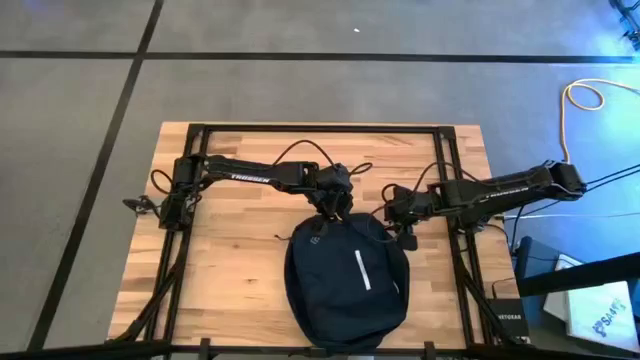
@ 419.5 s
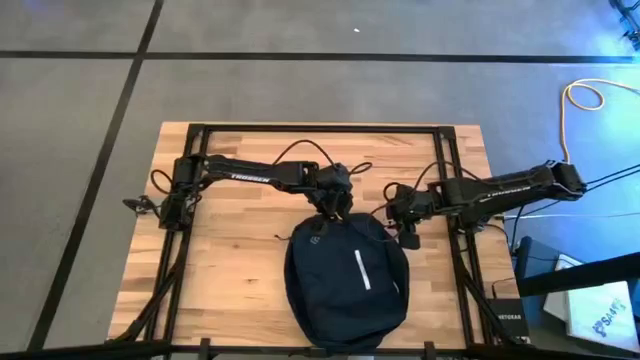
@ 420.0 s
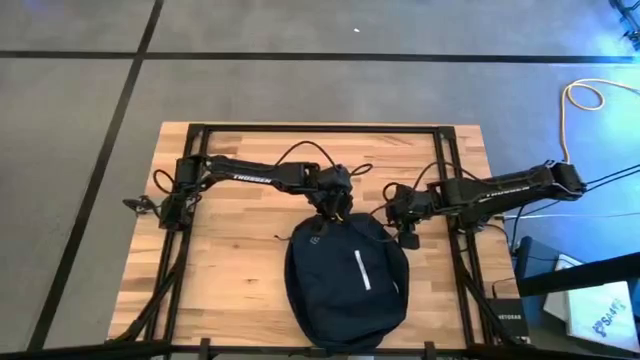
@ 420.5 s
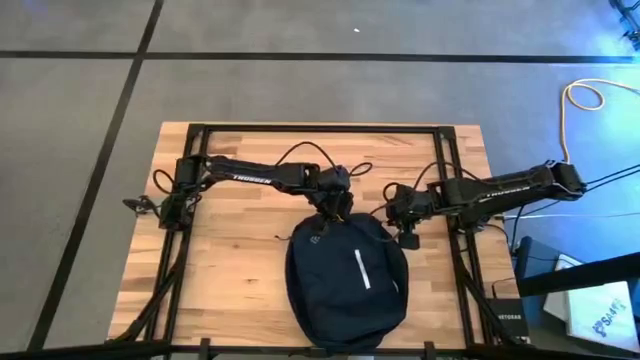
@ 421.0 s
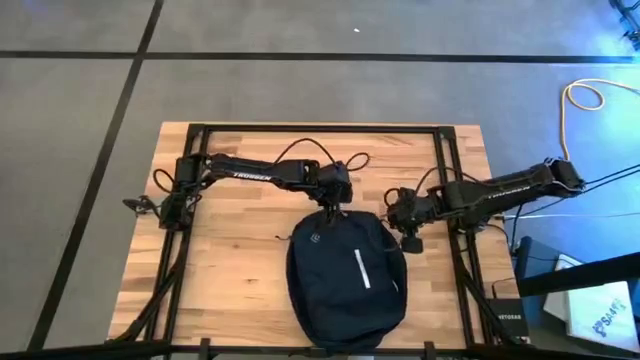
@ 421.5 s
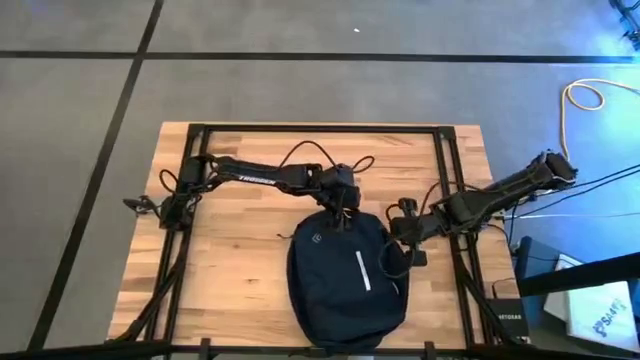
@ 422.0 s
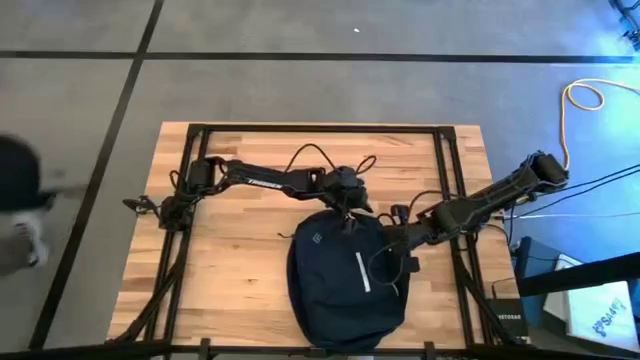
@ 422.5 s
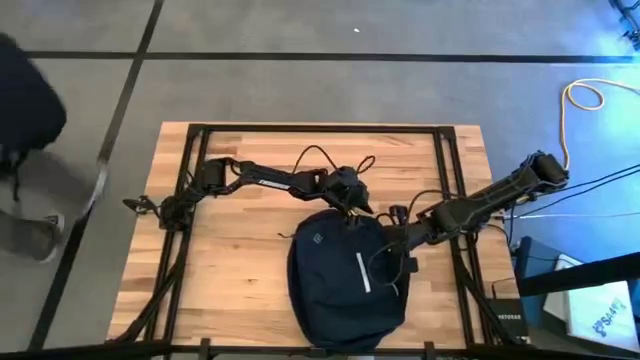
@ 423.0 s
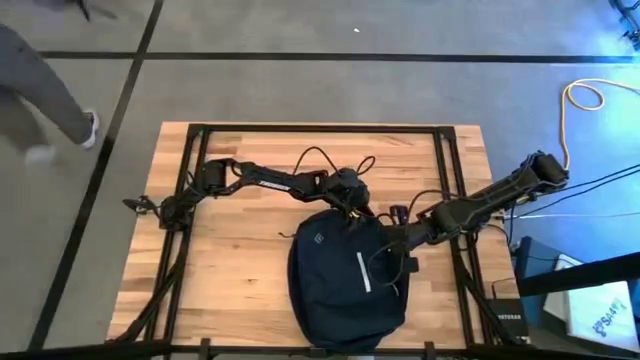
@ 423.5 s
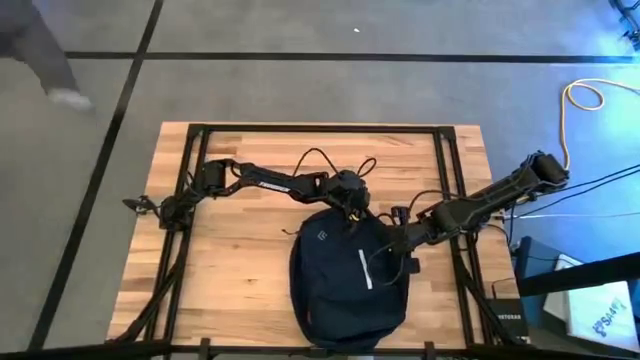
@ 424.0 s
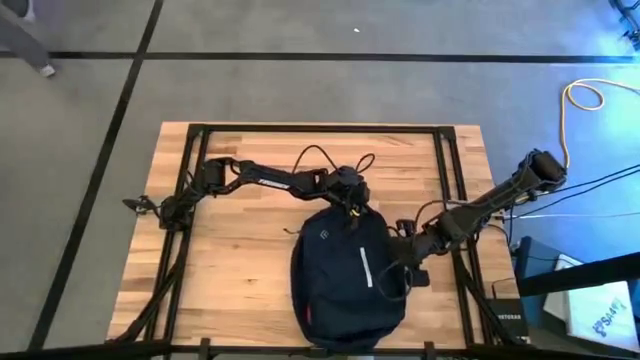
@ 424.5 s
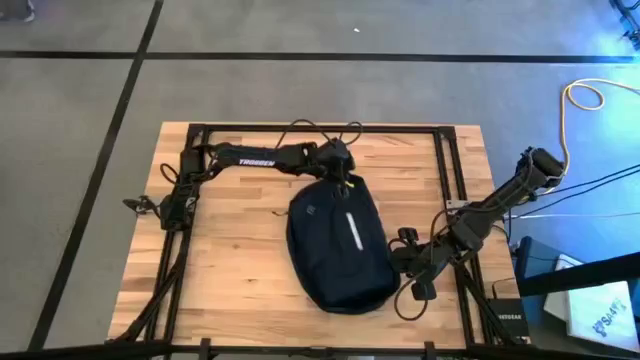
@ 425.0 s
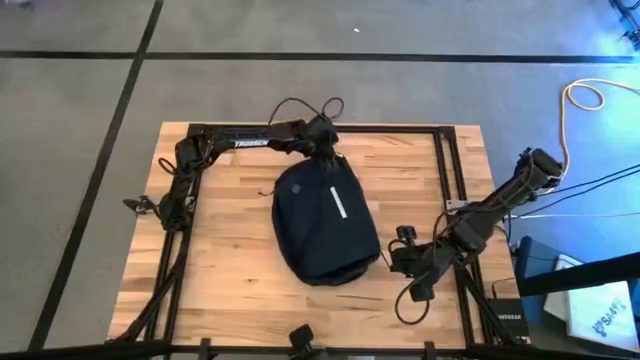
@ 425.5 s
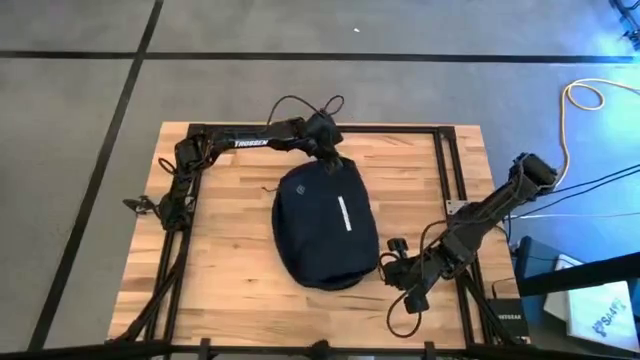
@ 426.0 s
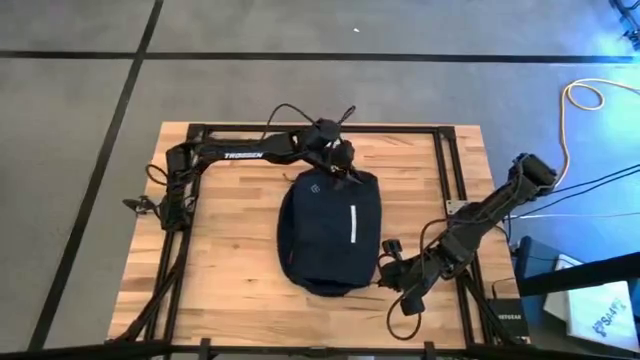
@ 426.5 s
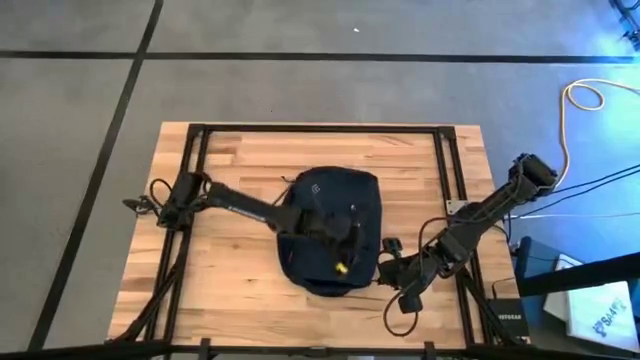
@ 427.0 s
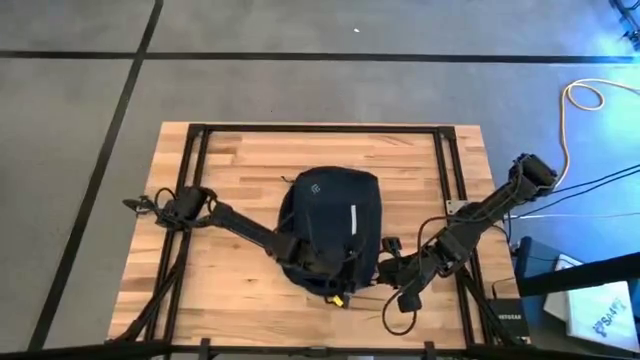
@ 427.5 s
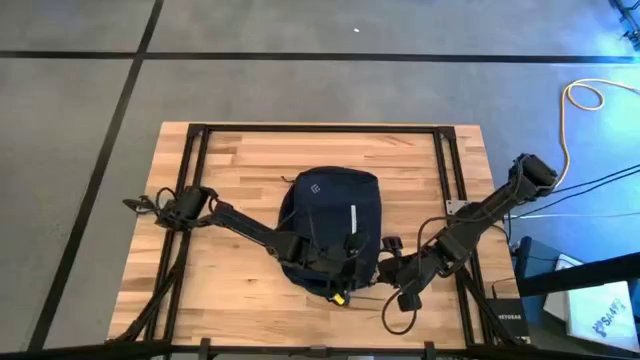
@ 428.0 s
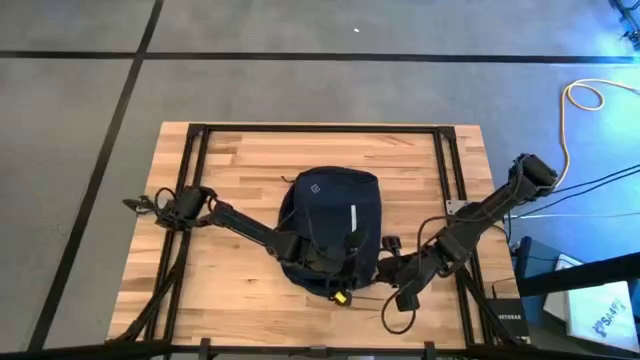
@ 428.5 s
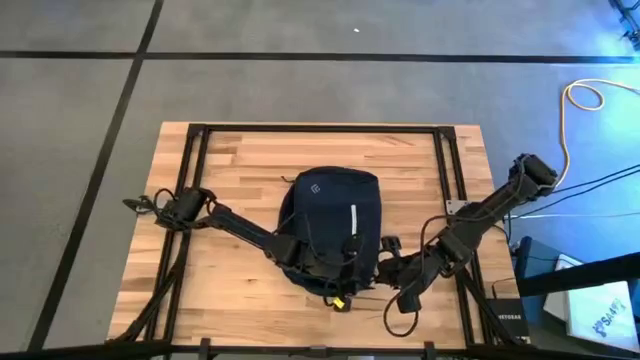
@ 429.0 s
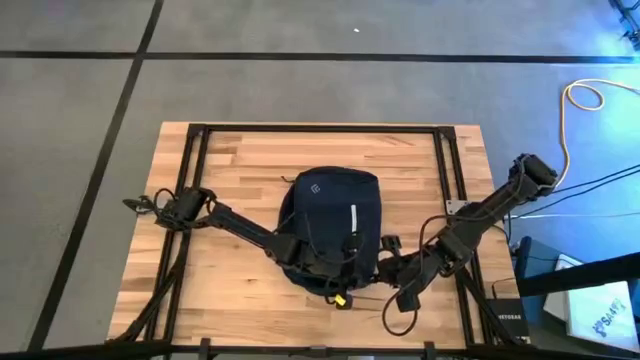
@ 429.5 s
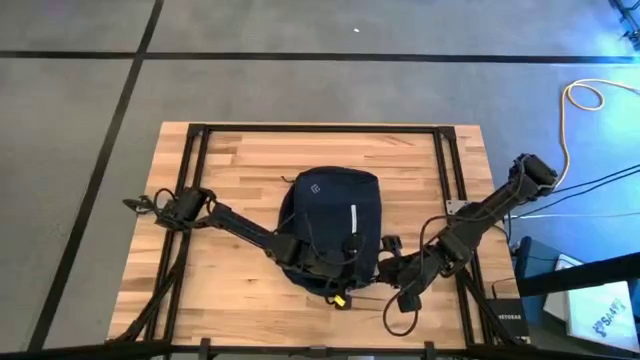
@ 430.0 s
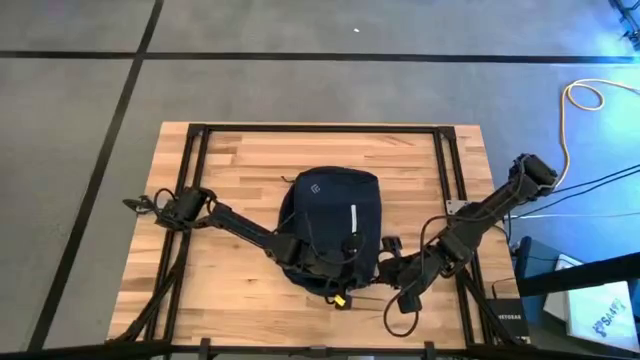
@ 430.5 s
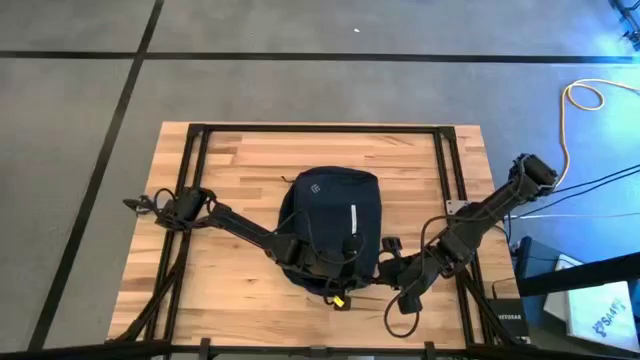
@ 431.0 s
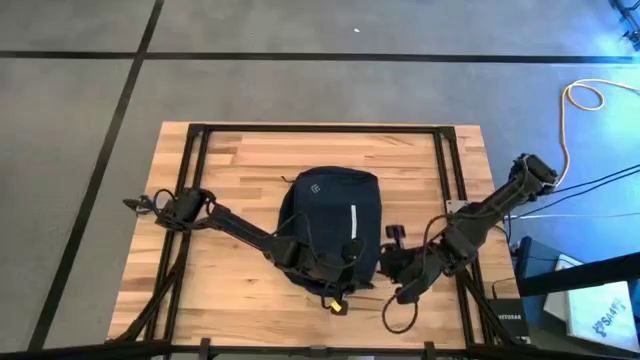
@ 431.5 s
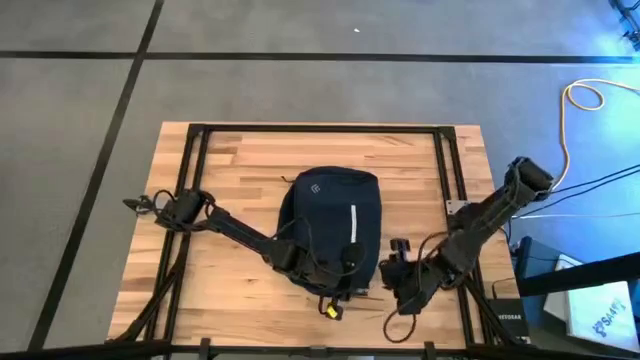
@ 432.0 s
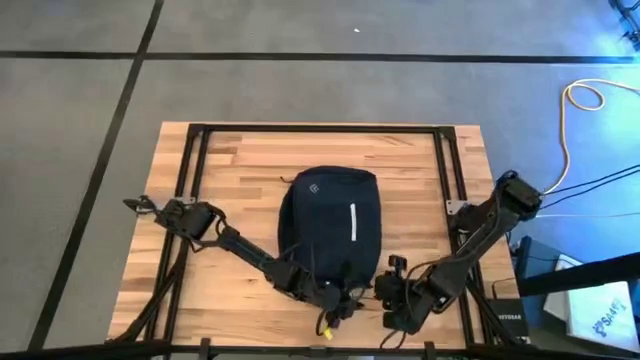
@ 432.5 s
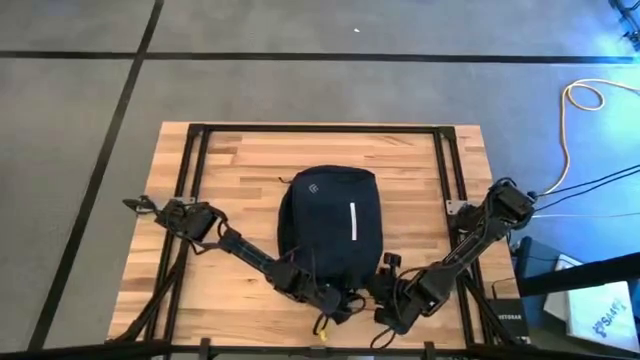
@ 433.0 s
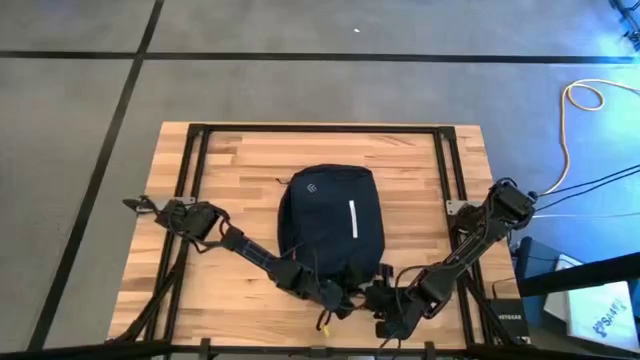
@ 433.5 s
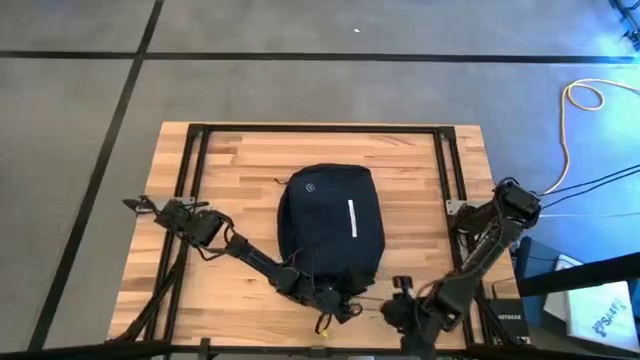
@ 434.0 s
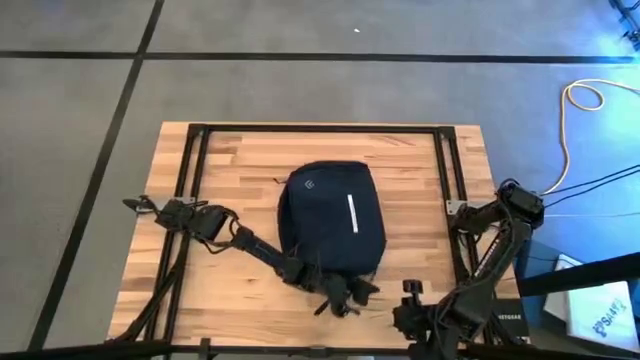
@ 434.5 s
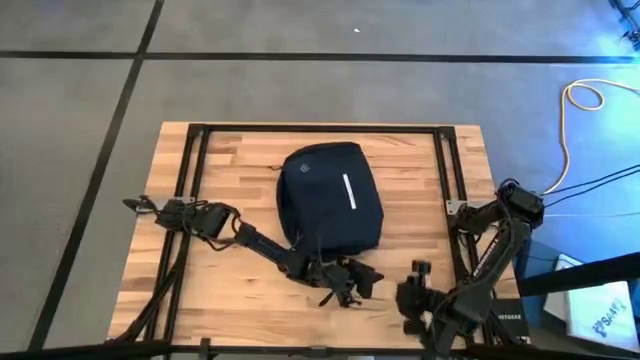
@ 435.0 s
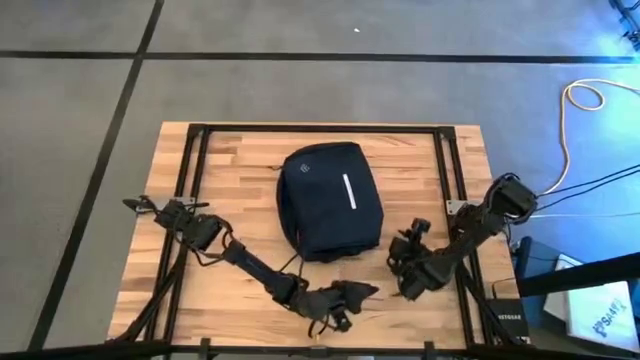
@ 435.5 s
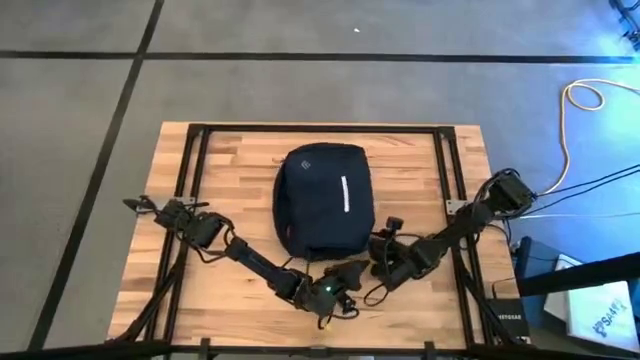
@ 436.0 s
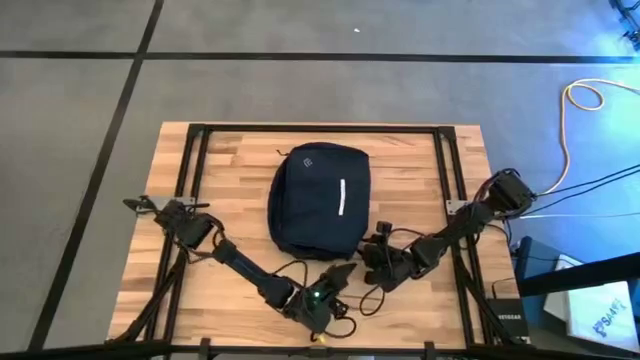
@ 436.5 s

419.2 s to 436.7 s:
Task: Unpack backpack
Close the blue backpack

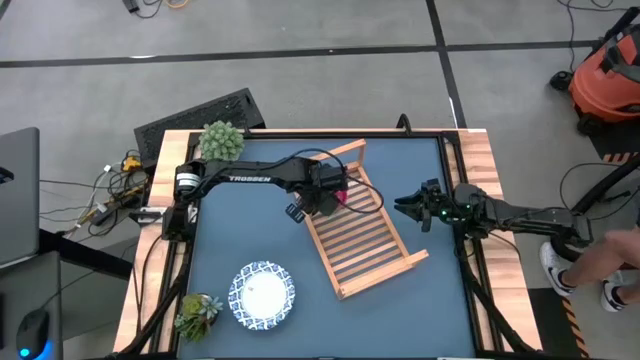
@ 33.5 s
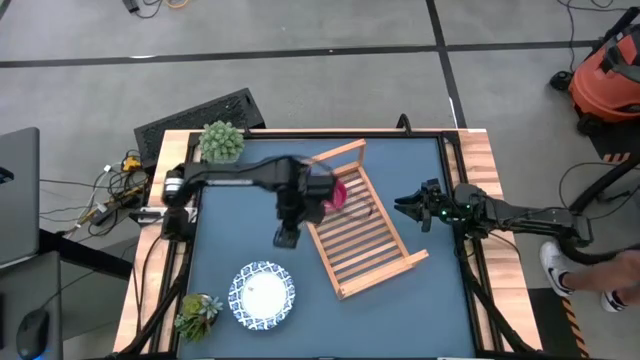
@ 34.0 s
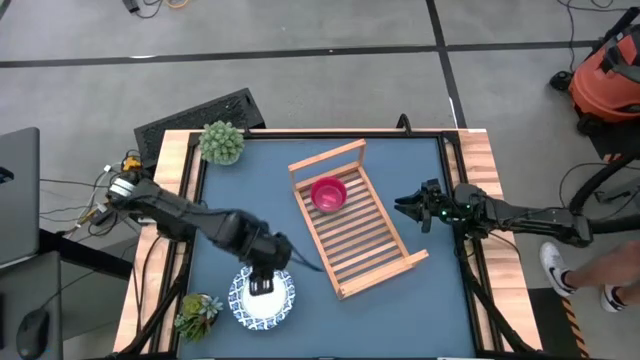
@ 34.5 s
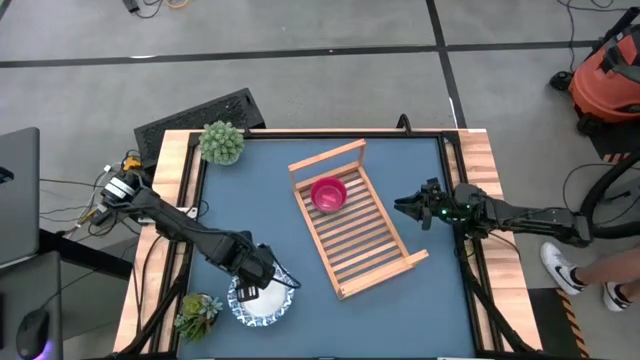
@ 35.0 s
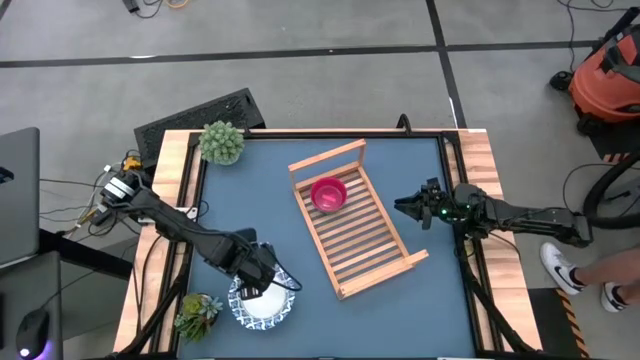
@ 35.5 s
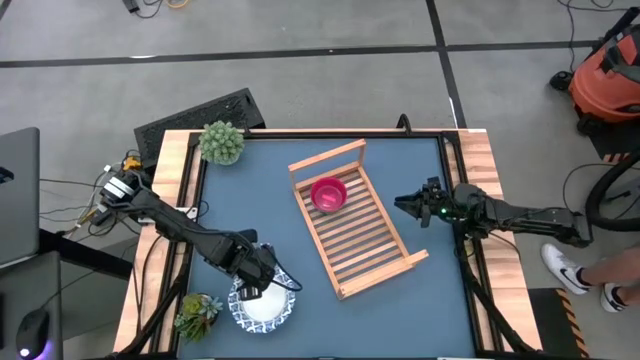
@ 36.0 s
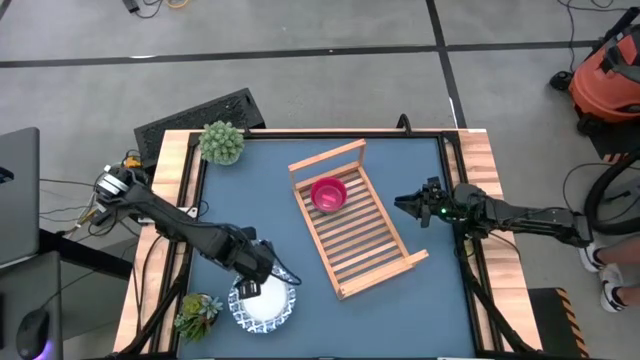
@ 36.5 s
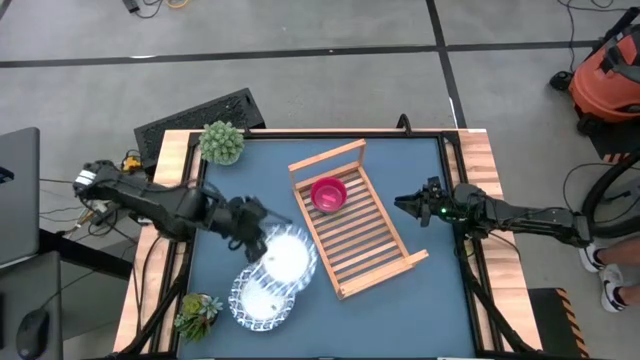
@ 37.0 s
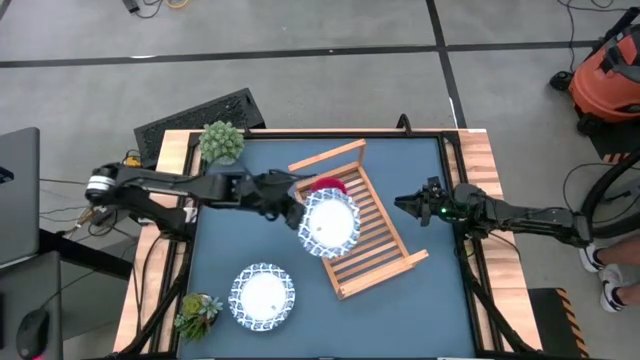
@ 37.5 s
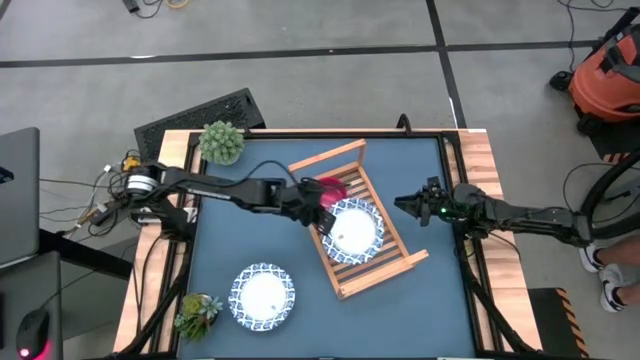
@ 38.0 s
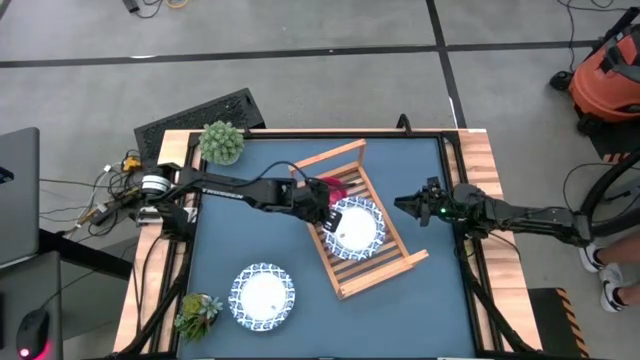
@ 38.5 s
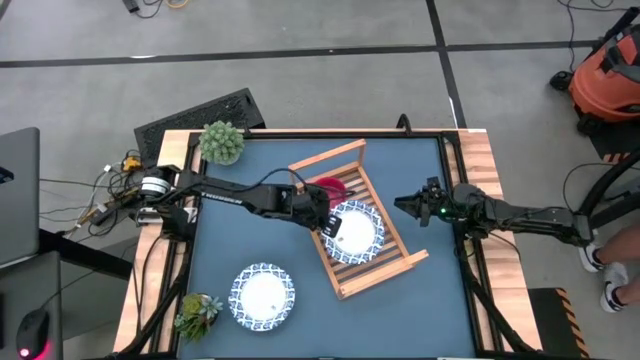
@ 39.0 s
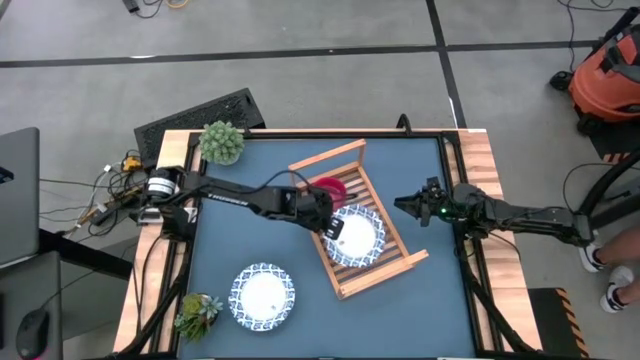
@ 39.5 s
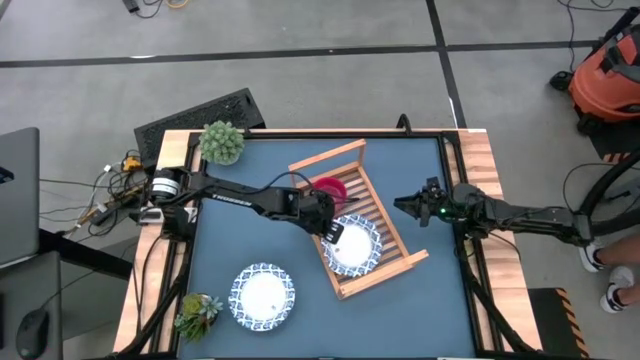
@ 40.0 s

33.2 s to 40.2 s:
Task: Place and stack bowls onto a shelf
Put the white blue bowl on the wooden shelf
